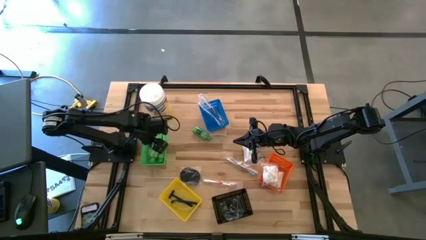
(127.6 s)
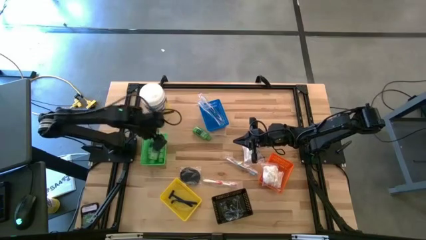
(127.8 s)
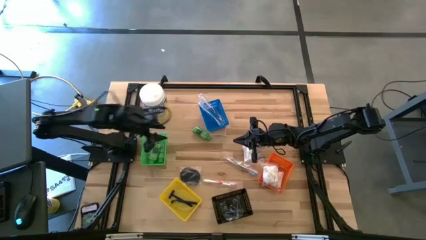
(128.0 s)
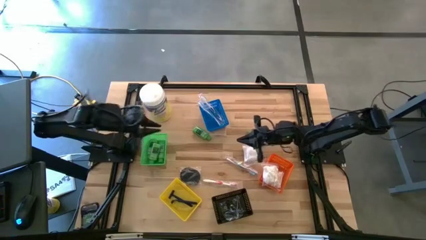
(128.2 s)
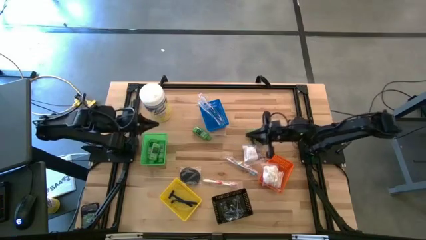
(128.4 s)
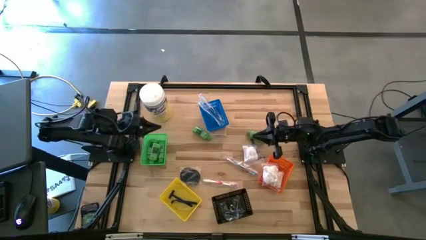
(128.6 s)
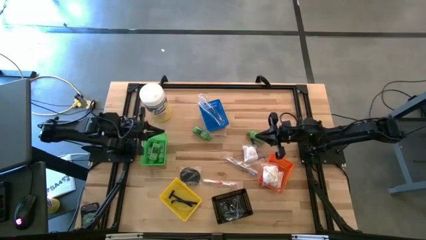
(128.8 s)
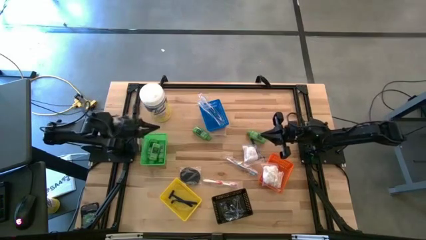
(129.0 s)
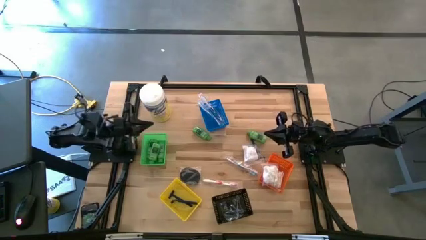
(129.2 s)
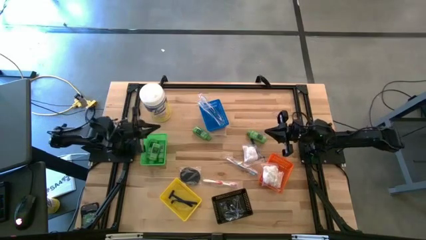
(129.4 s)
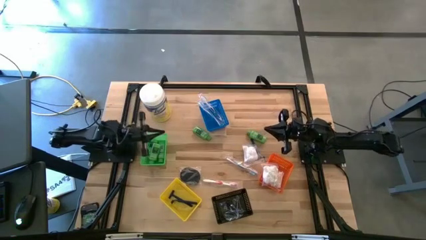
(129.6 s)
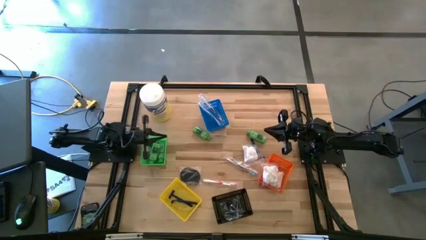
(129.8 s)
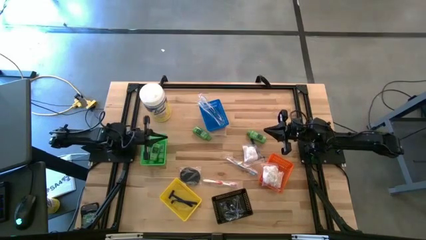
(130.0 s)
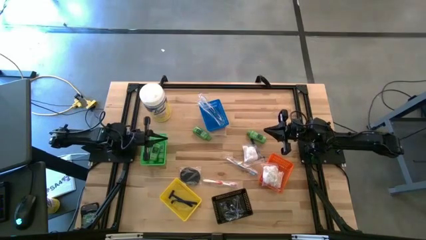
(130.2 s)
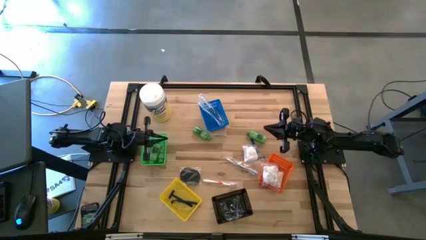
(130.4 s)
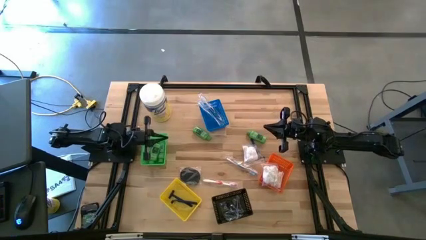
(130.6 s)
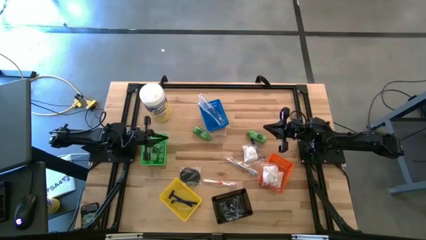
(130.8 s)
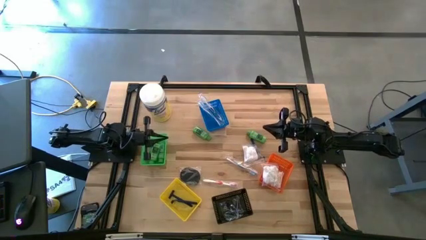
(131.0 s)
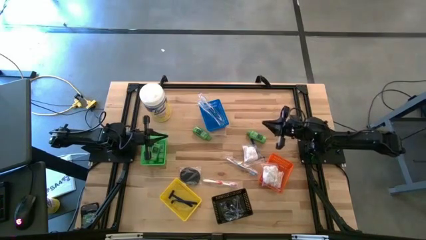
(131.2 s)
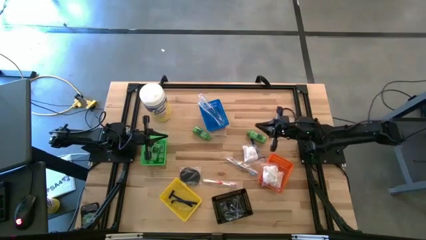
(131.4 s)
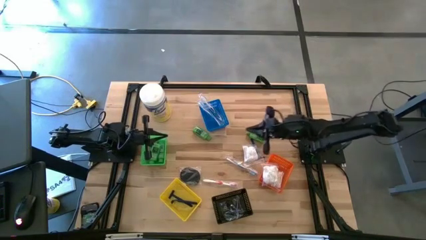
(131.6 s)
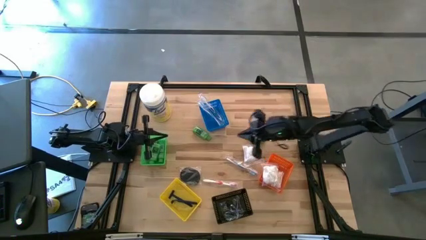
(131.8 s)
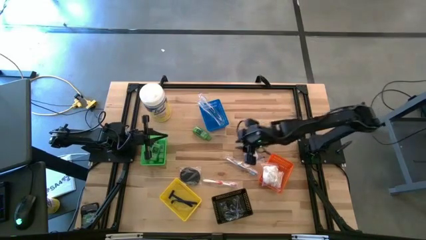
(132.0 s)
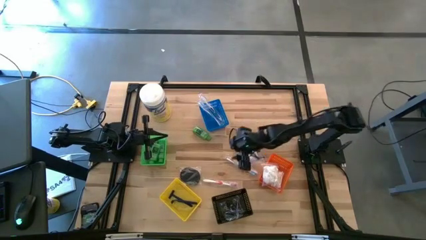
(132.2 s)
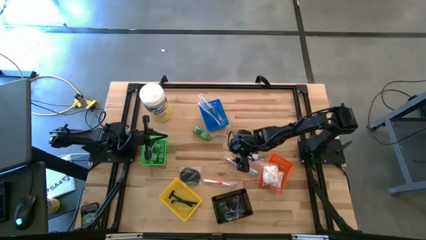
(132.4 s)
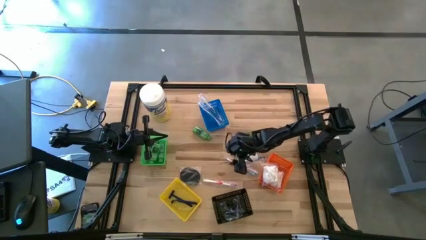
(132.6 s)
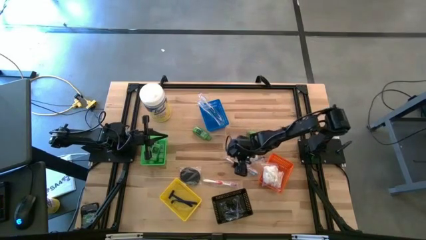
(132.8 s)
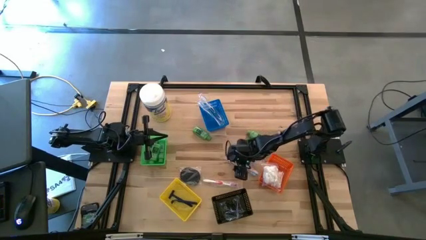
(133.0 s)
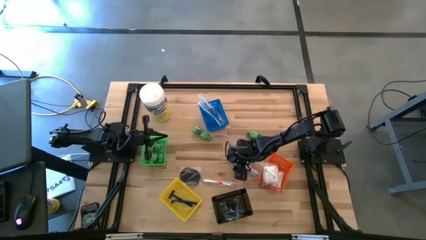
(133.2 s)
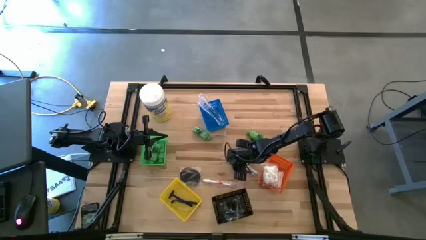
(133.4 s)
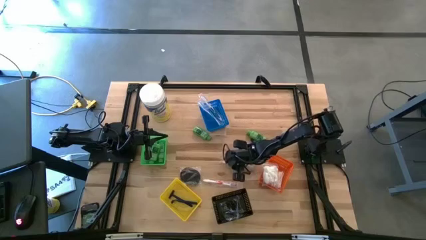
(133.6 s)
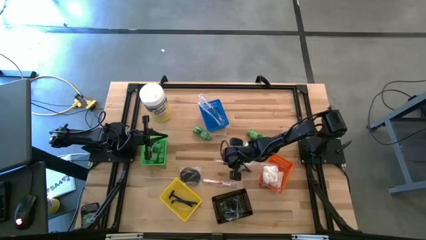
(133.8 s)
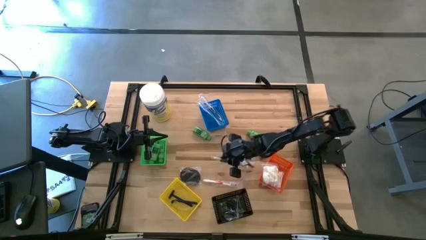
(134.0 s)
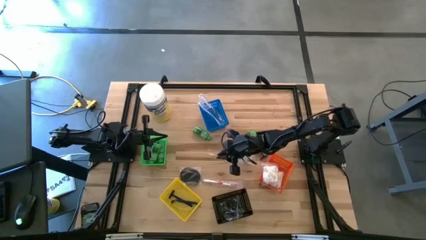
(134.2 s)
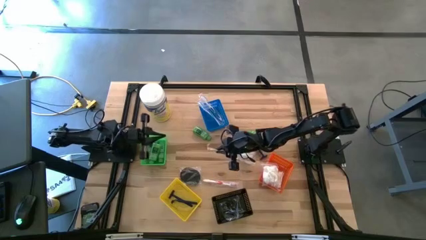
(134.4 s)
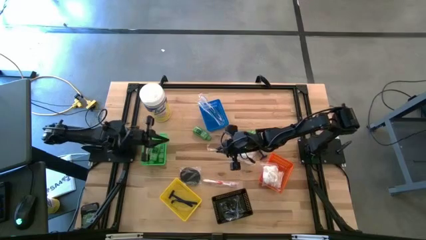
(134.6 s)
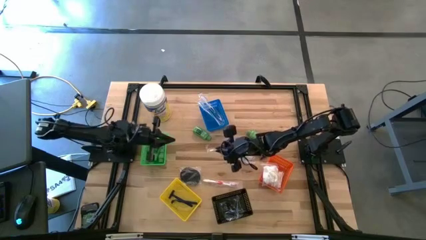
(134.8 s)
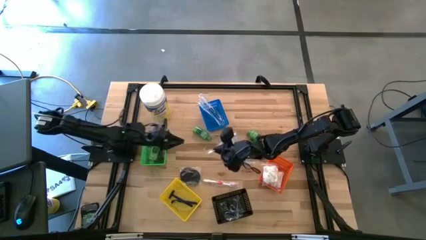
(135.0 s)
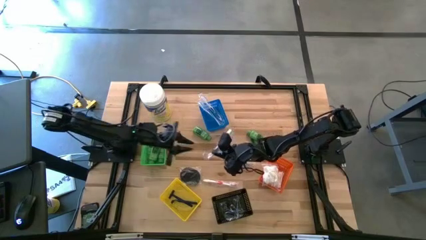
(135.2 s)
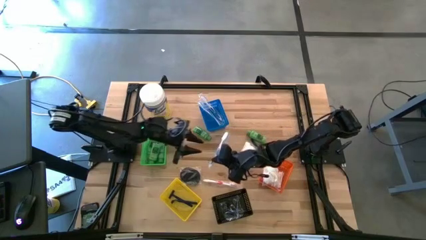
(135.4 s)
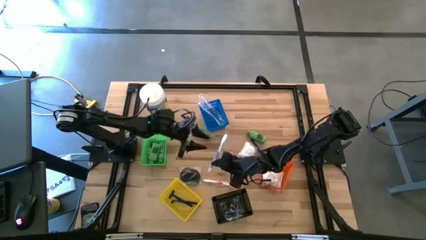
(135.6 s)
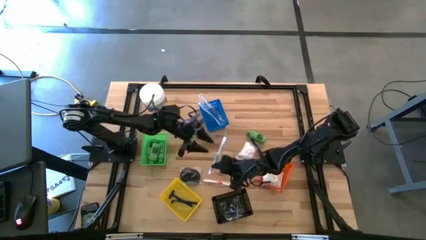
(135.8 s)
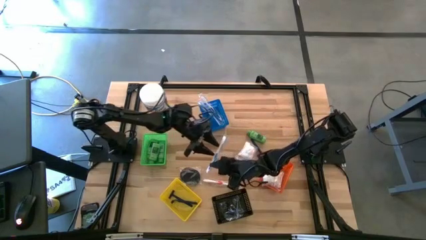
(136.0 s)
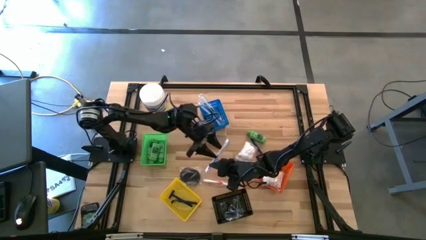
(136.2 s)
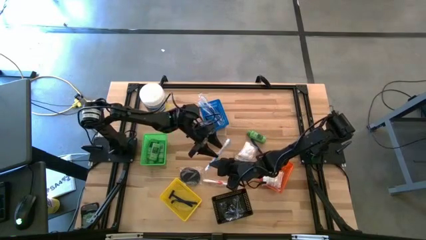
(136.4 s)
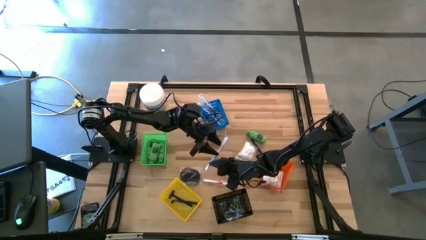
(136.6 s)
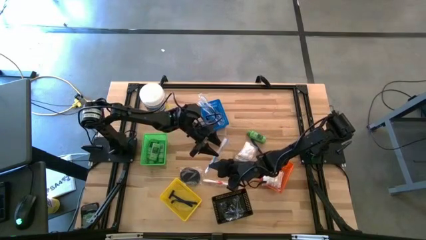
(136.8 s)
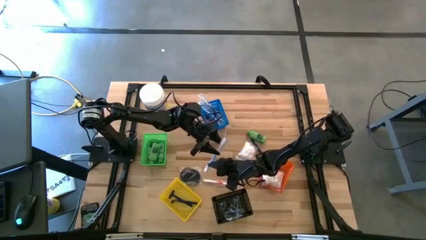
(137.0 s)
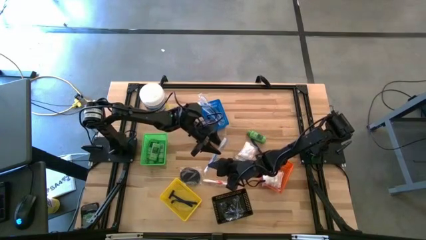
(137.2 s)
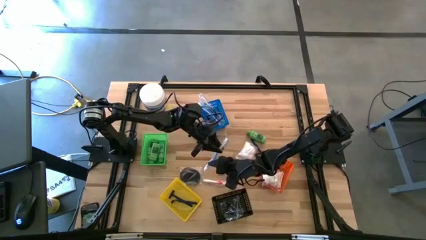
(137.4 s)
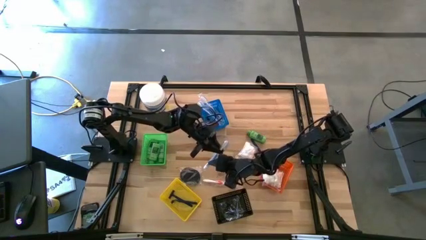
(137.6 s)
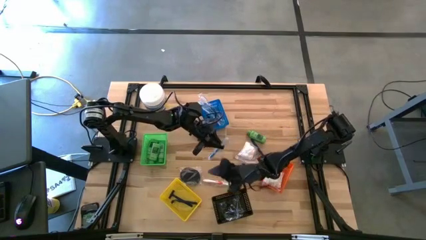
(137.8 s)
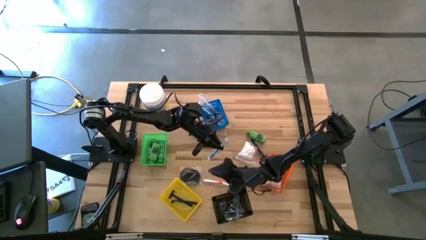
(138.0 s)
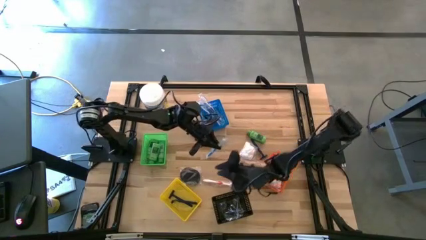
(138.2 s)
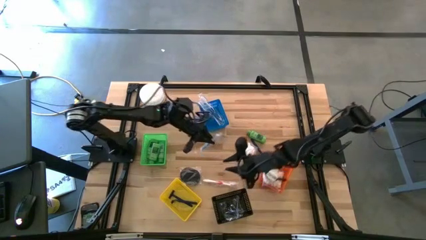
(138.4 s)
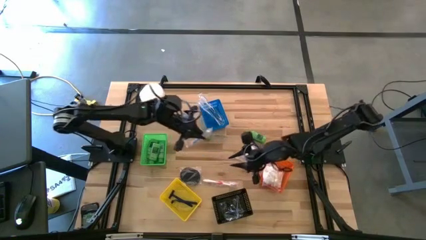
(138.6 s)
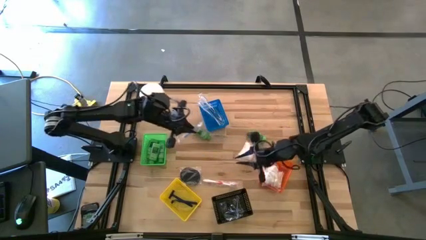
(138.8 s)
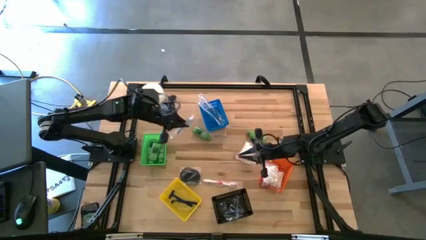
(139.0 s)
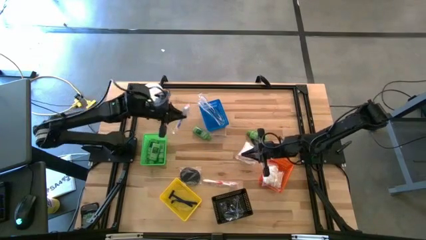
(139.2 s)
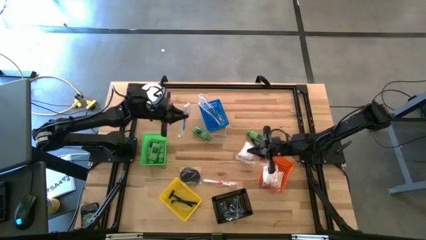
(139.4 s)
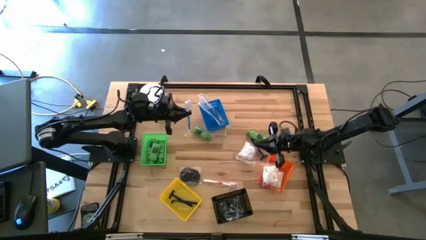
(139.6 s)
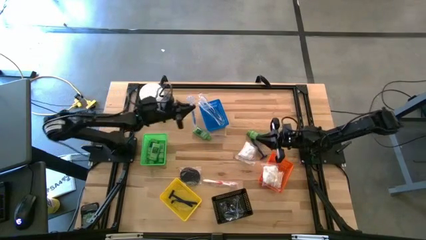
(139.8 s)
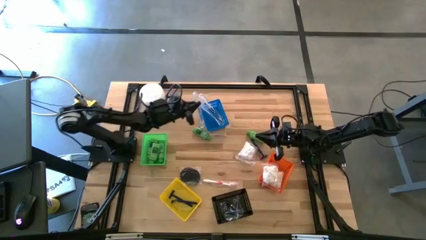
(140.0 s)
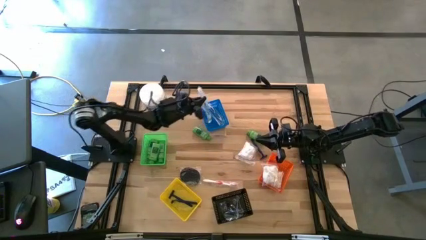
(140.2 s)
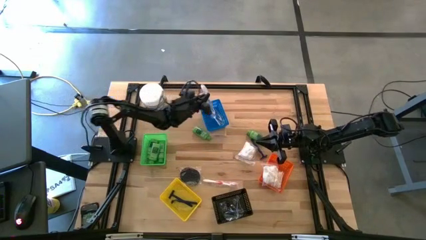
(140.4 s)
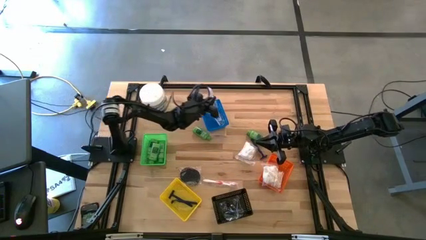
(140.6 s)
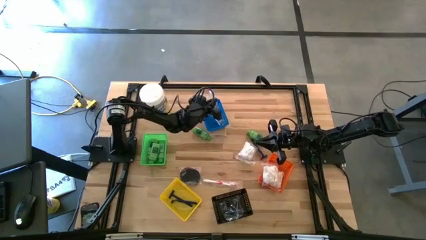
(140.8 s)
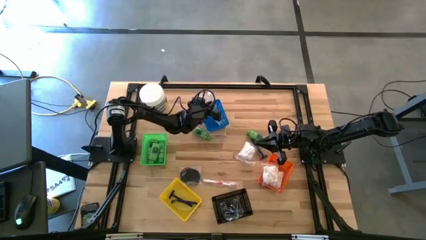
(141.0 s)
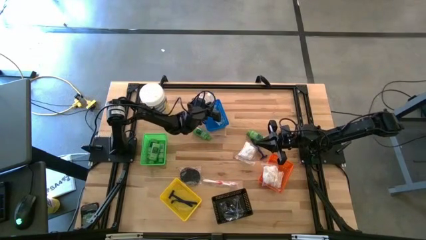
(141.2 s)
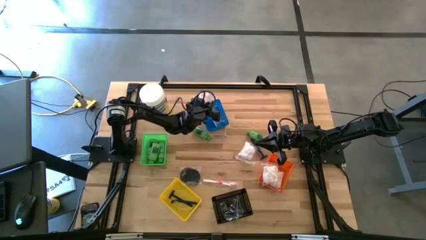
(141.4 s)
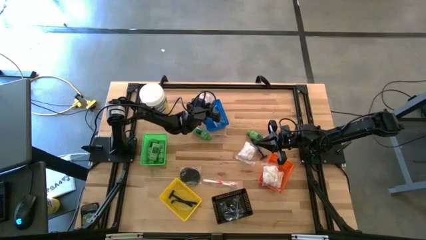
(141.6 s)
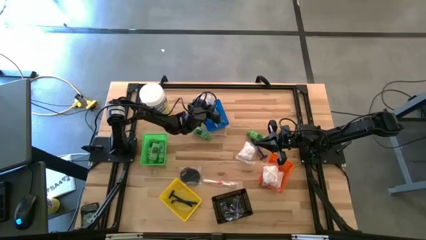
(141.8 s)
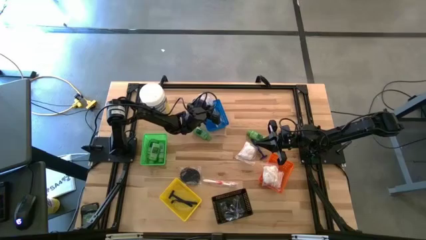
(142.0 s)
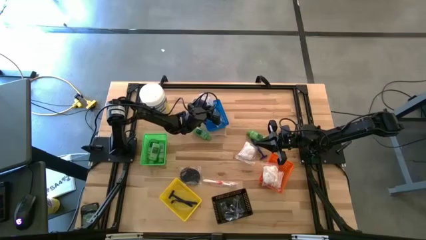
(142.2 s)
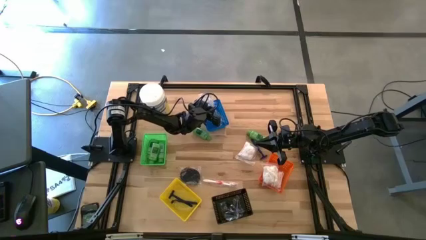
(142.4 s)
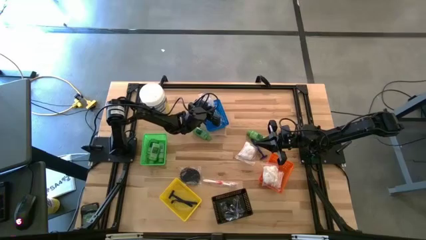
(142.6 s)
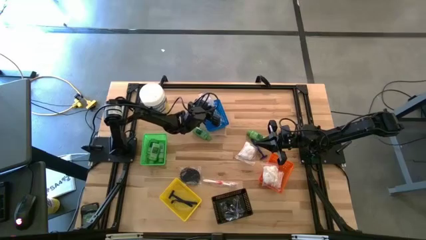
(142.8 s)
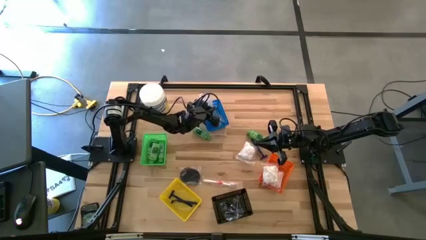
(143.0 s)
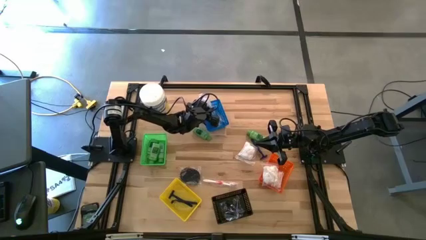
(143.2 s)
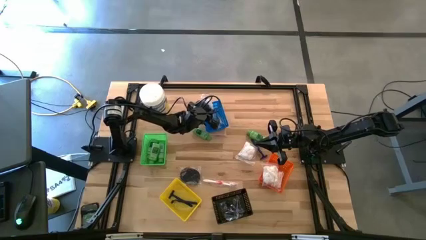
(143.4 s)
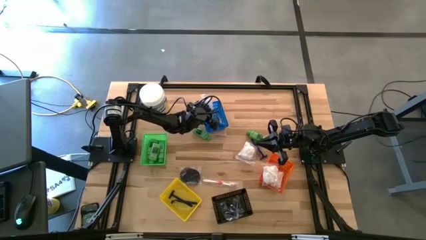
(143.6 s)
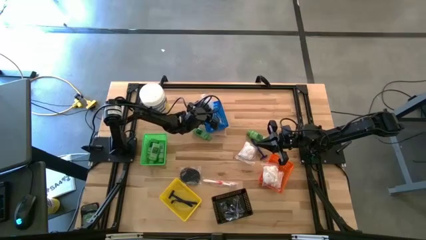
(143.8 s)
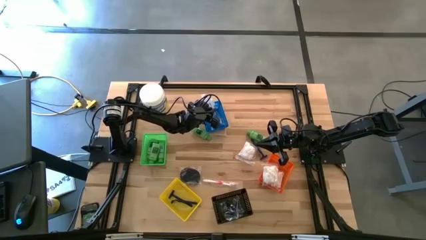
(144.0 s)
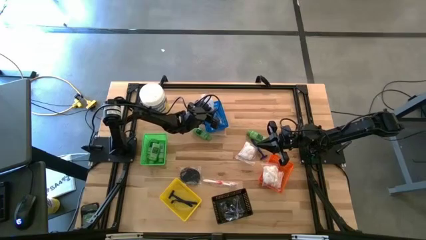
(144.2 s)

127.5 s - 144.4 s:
Task: Pick & Place Travel size toiletries
Put the blue toothbrush into the blue bin
